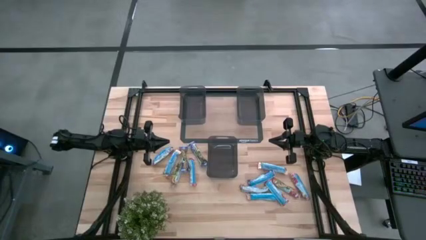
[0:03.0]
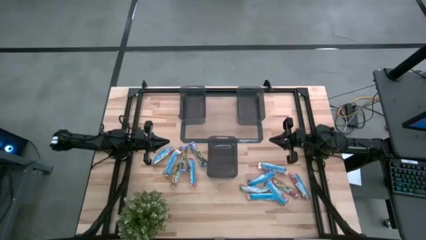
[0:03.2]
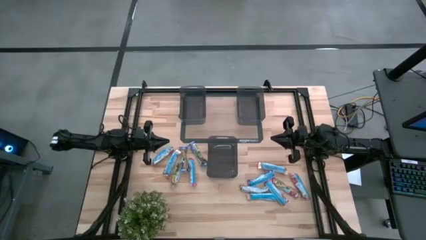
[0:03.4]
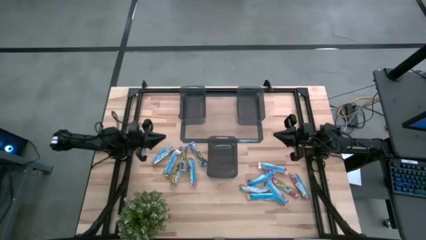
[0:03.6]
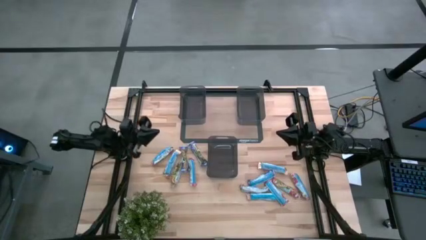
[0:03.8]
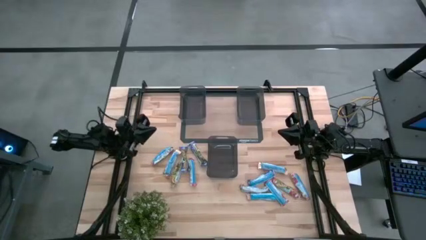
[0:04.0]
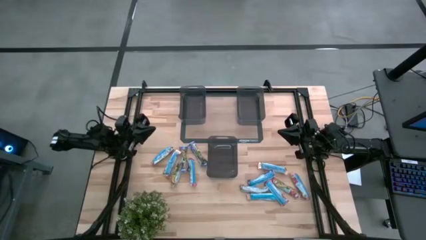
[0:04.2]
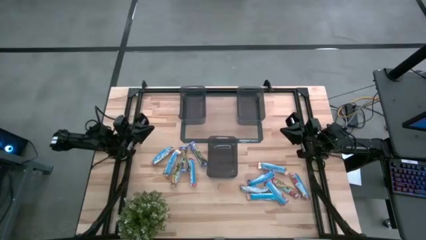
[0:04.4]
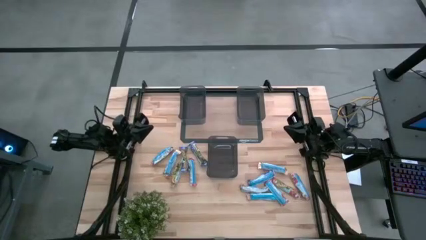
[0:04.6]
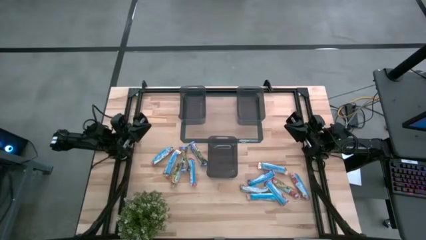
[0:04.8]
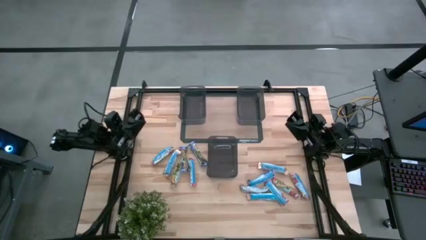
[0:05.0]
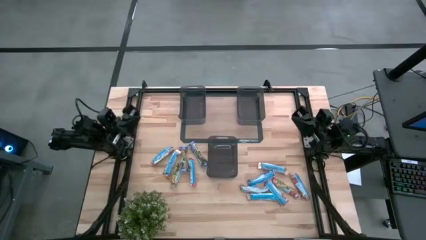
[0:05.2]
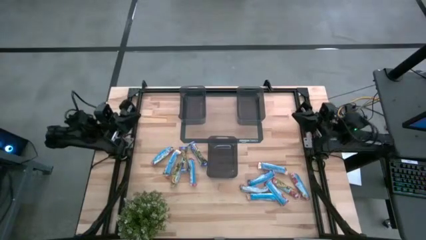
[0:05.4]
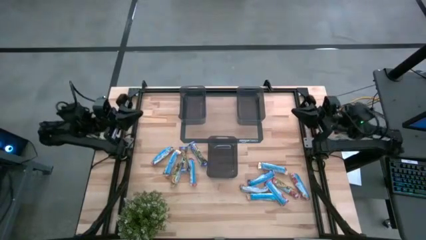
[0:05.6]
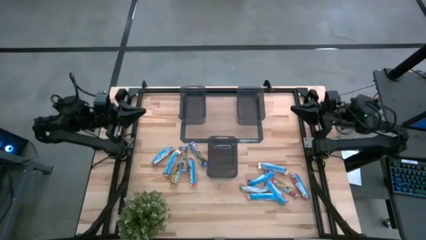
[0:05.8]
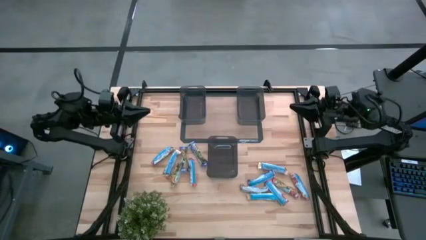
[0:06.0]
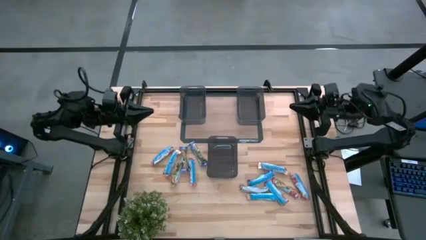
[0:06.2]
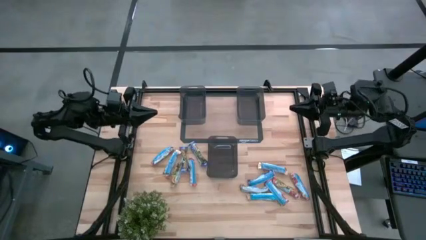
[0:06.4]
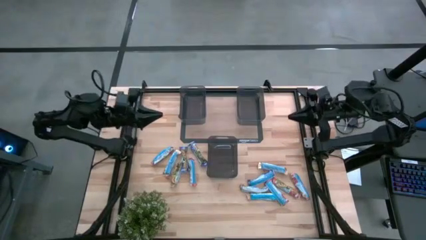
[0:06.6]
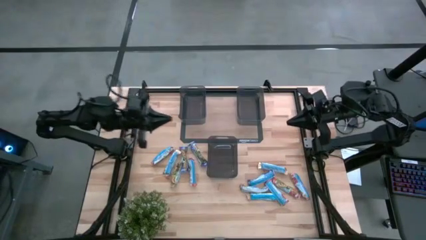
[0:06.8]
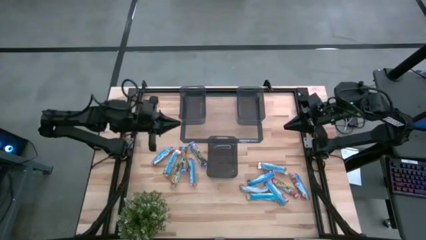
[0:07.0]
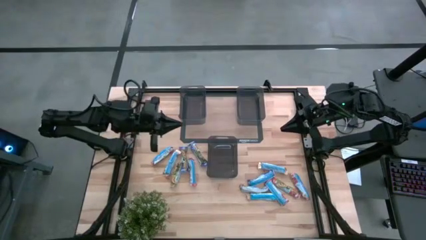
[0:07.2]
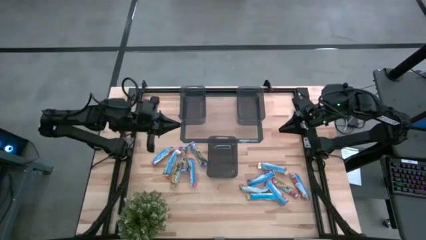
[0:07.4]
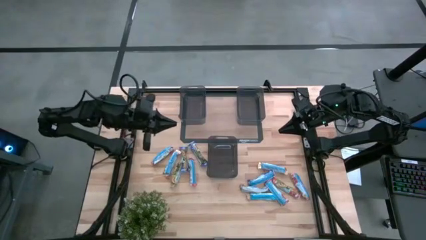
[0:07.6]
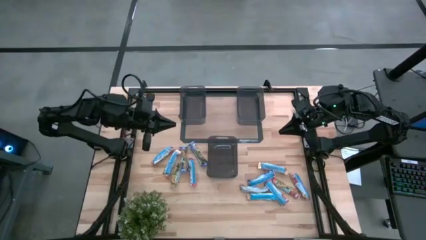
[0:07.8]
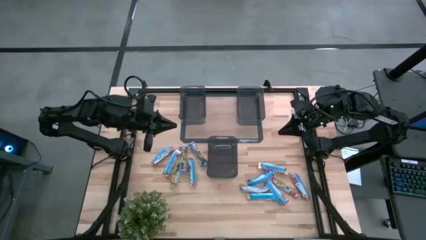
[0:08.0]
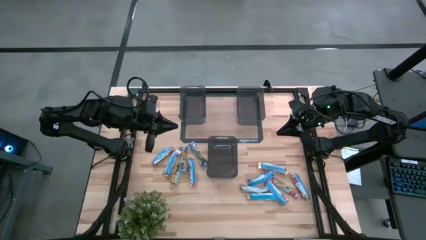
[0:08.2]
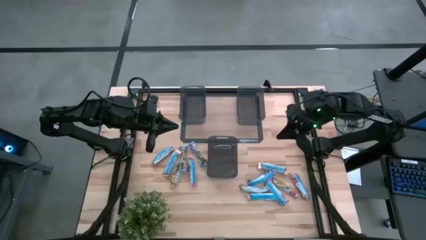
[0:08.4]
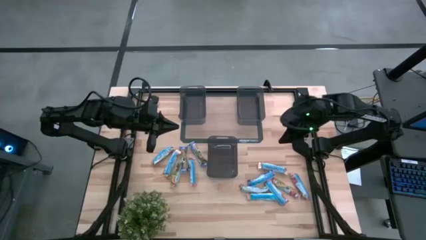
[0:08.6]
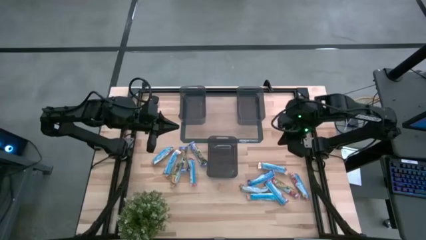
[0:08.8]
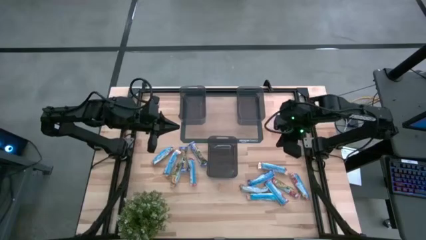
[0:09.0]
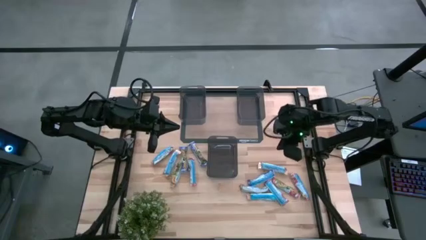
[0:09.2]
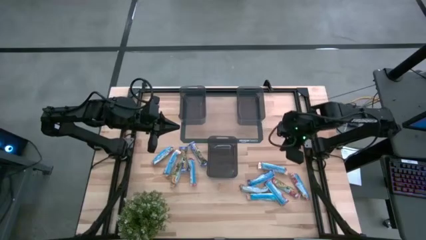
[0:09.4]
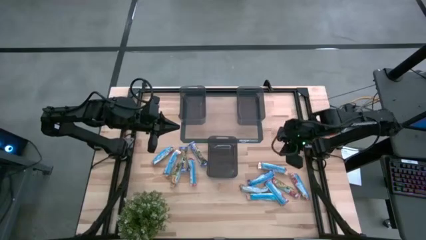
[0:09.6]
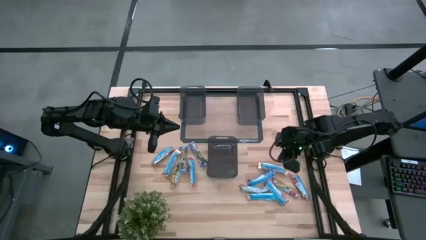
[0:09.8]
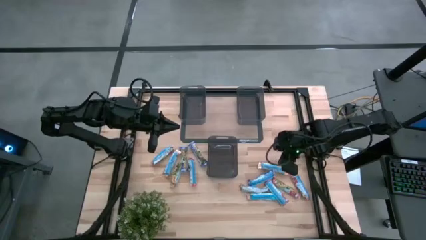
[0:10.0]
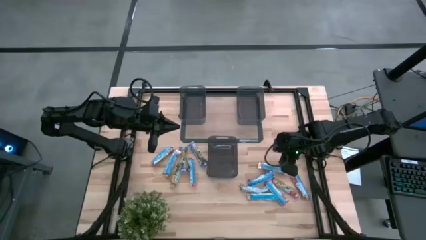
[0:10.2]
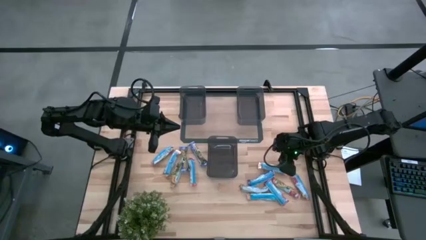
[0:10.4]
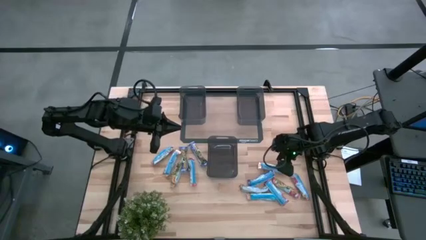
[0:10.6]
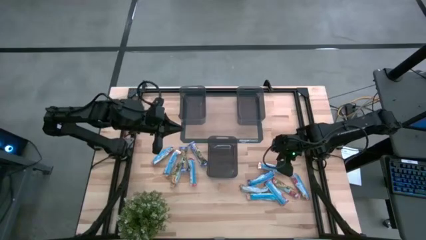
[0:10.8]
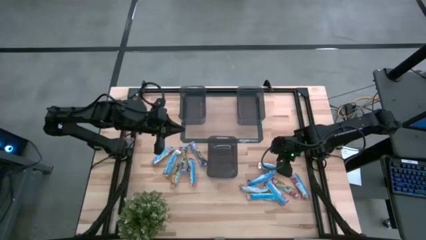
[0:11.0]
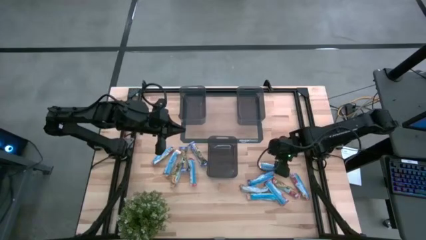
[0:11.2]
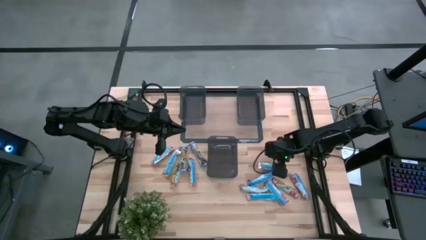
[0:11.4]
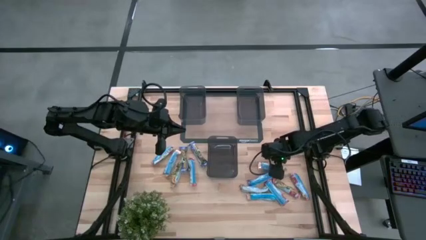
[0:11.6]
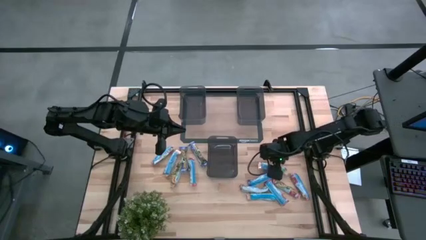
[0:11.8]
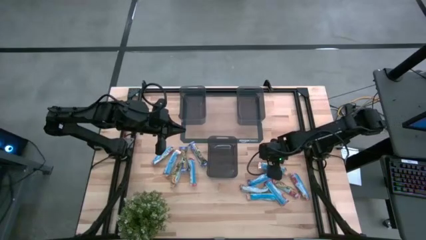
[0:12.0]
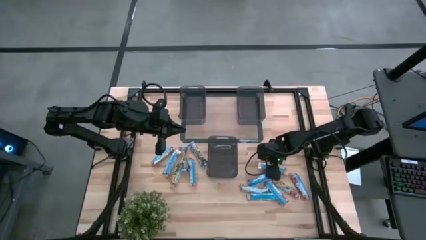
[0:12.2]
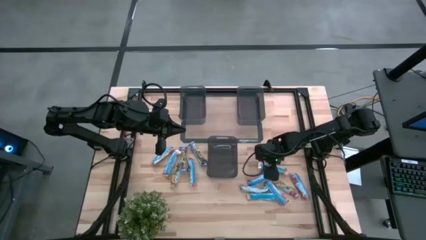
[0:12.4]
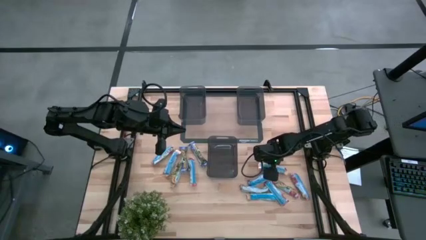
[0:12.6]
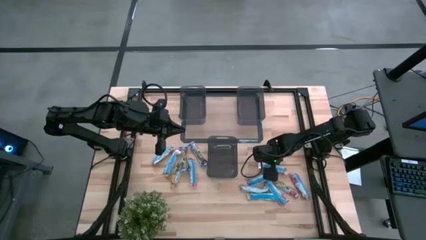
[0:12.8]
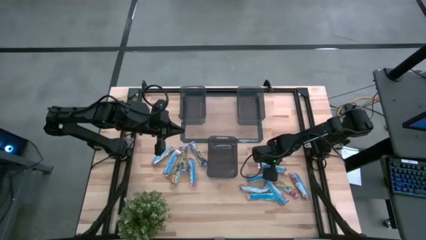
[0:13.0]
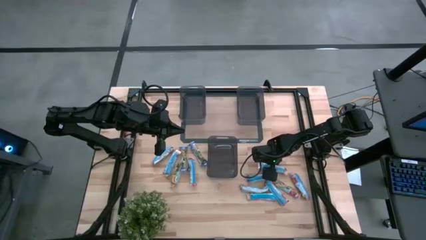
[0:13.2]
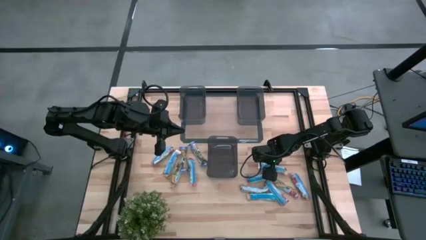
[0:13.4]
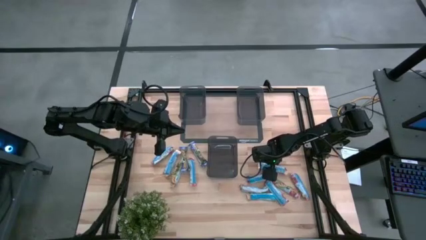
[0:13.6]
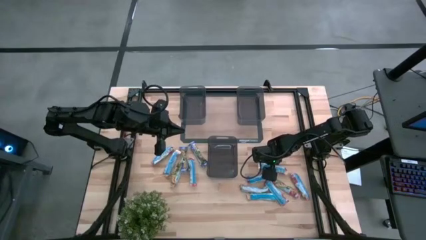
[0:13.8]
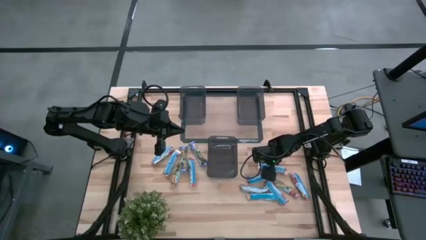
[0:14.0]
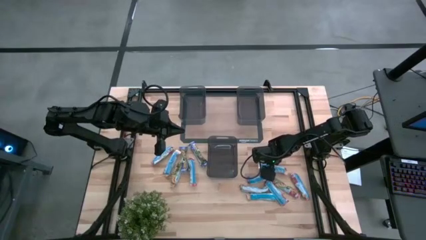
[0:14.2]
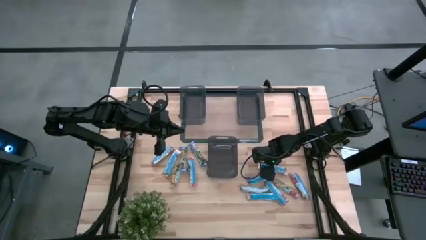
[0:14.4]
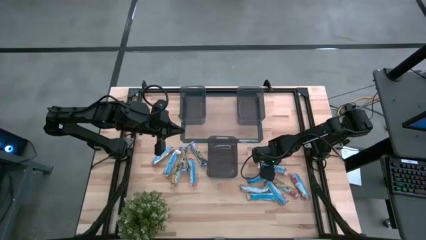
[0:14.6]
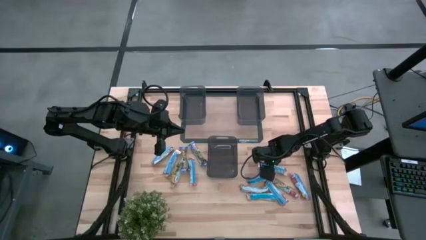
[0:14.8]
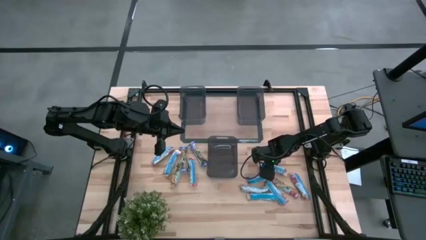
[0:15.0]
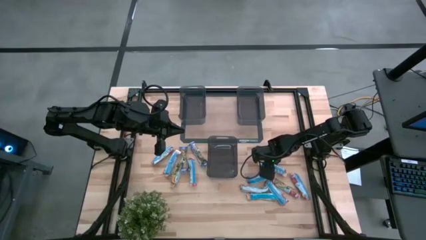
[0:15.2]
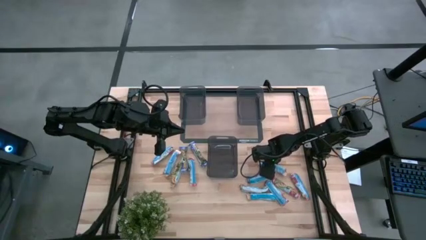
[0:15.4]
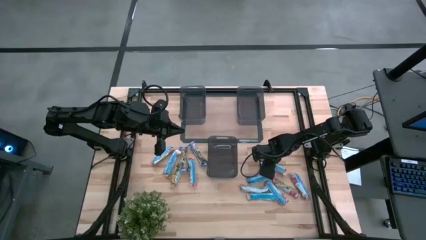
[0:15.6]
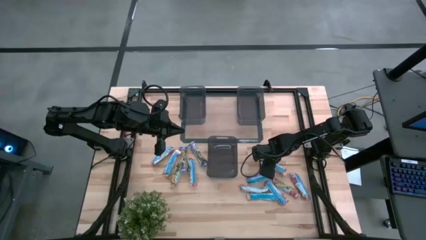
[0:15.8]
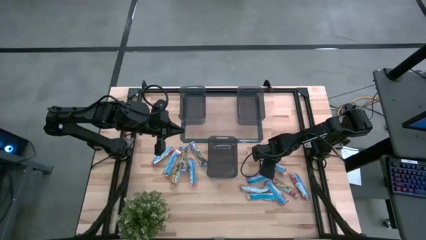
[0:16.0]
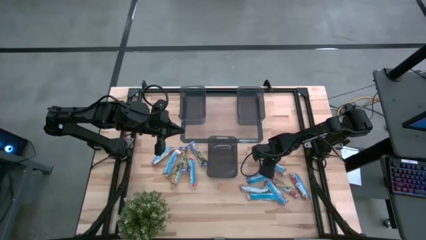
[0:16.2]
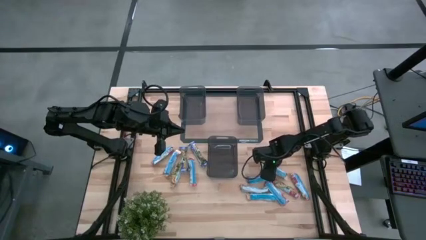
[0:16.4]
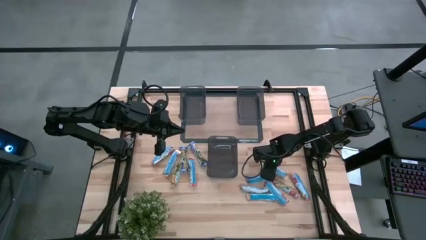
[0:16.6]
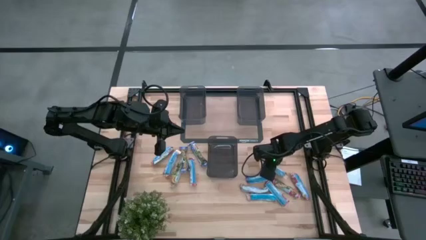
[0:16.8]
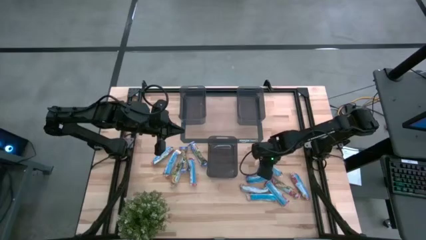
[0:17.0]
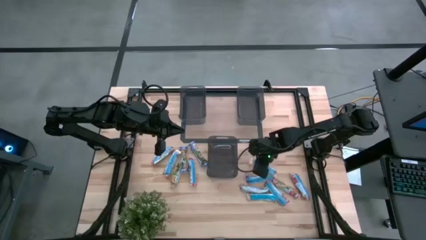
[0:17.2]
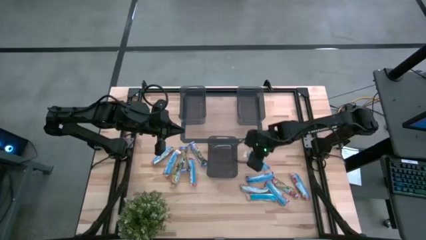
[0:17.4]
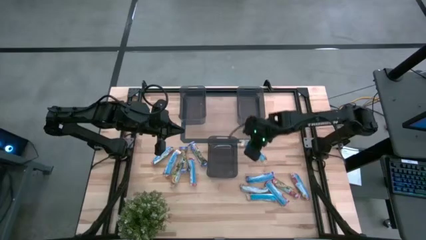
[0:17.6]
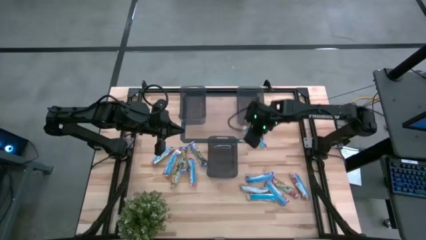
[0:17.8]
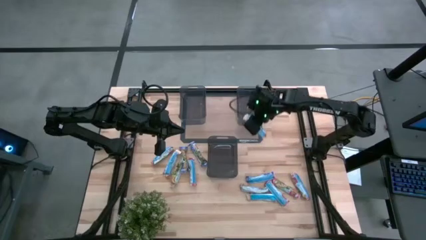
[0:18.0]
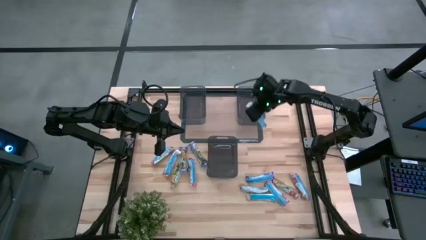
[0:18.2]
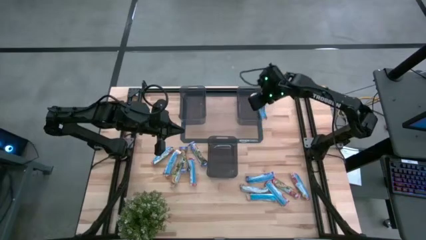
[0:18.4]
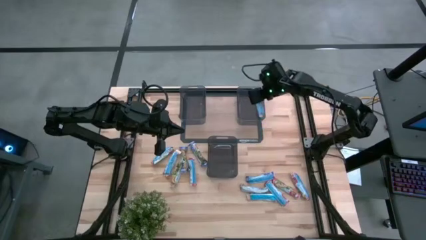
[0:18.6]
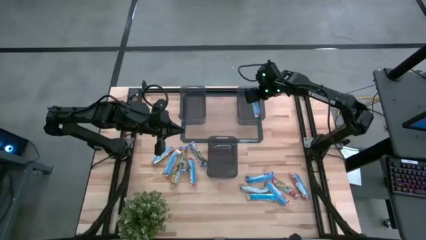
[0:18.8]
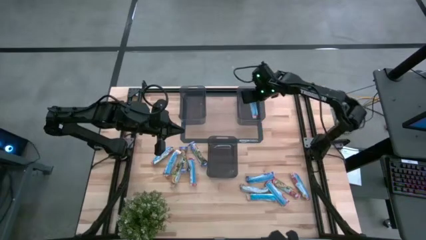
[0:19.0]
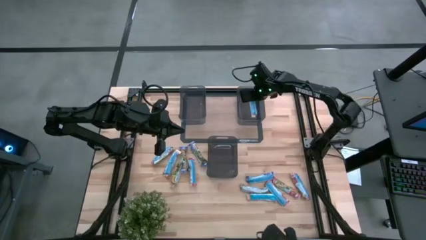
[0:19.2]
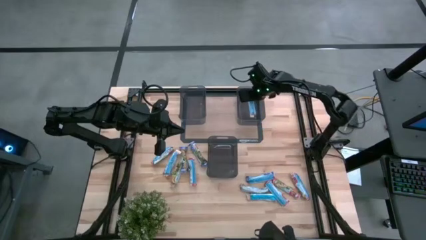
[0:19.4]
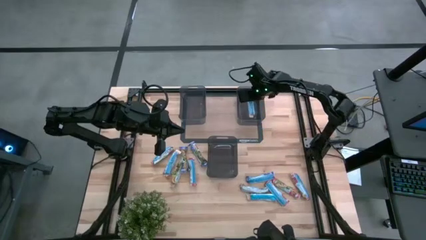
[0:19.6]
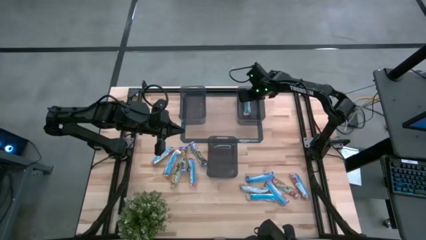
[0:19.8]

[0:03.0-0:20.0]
Task: Pick and place Granola Bars by type
Put the yellow granola bar into the right black bin
